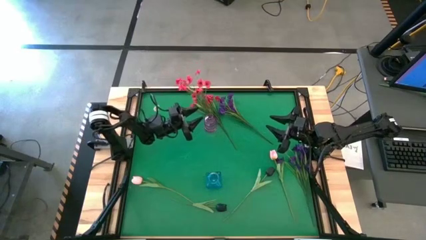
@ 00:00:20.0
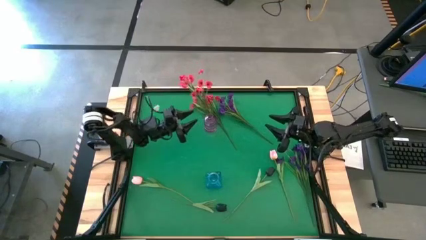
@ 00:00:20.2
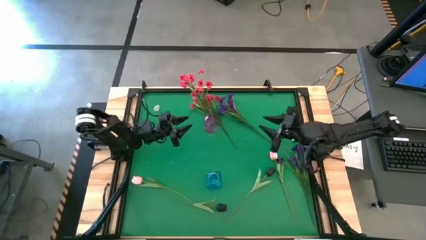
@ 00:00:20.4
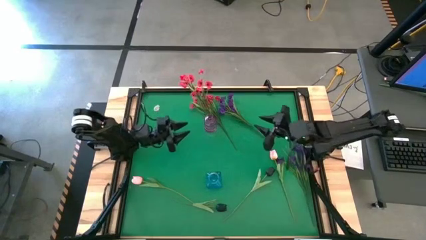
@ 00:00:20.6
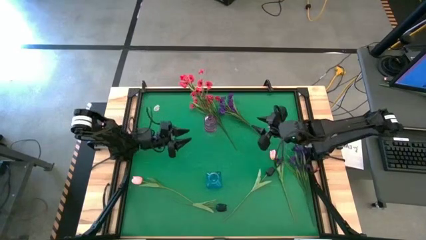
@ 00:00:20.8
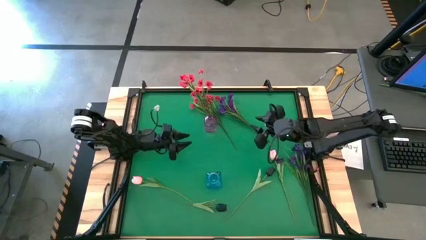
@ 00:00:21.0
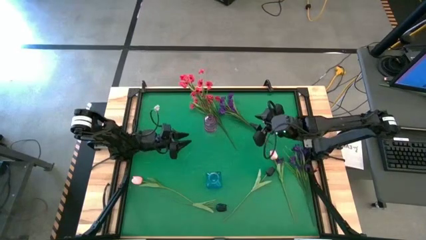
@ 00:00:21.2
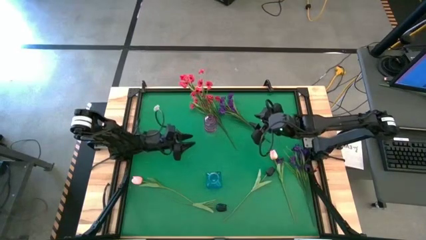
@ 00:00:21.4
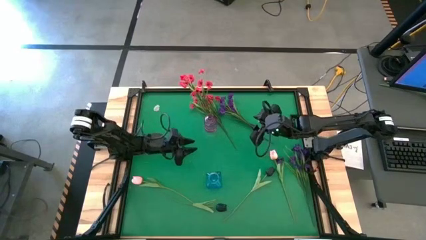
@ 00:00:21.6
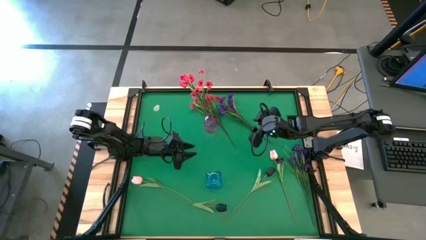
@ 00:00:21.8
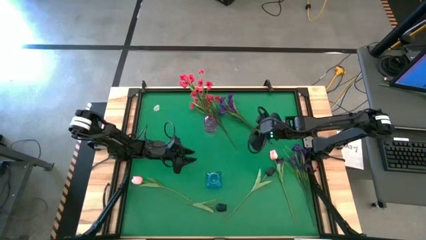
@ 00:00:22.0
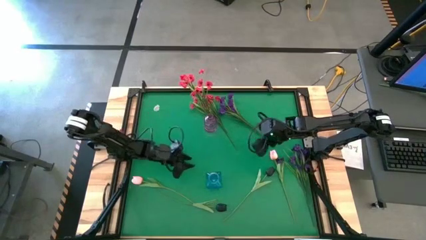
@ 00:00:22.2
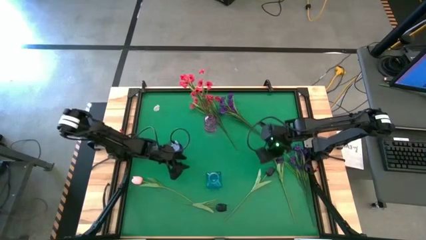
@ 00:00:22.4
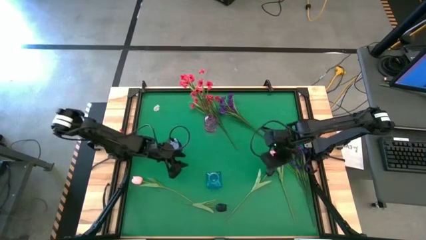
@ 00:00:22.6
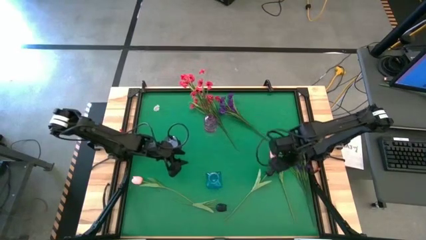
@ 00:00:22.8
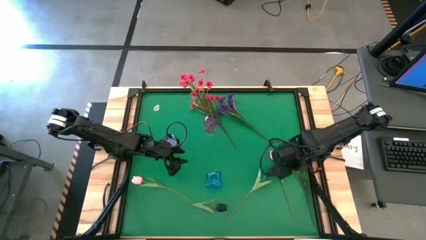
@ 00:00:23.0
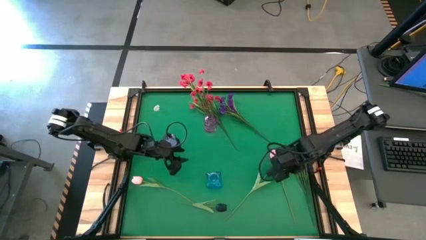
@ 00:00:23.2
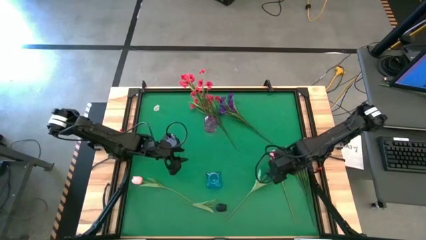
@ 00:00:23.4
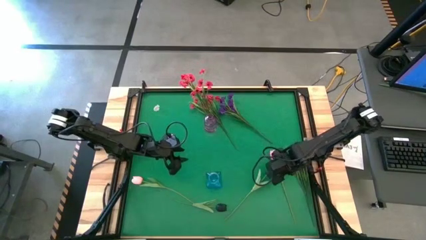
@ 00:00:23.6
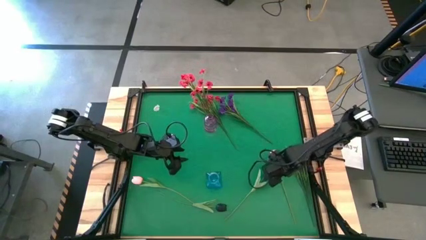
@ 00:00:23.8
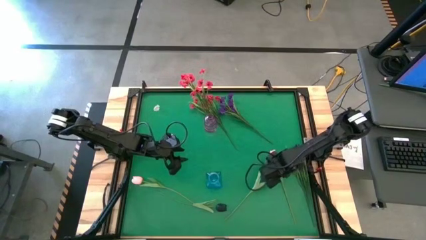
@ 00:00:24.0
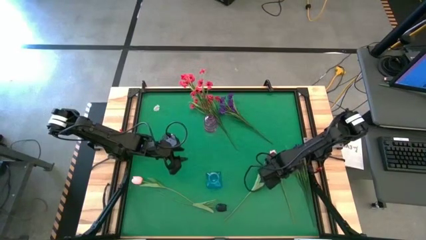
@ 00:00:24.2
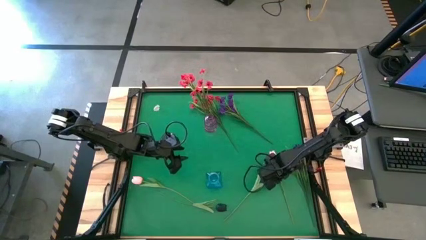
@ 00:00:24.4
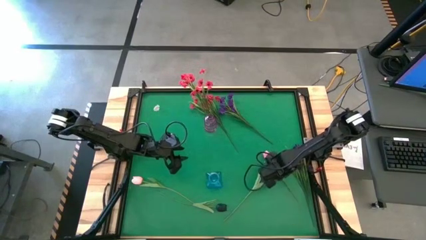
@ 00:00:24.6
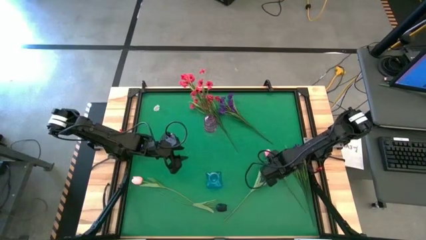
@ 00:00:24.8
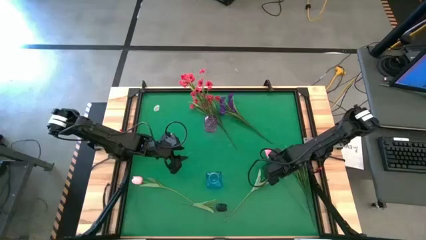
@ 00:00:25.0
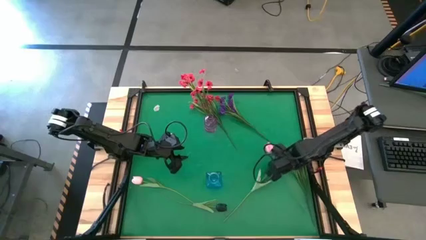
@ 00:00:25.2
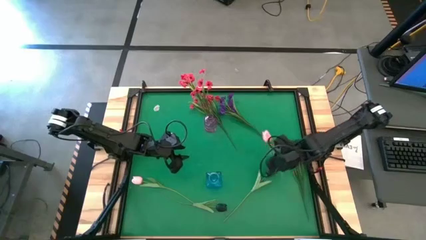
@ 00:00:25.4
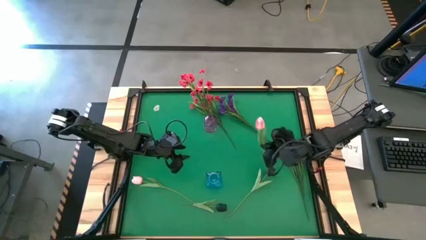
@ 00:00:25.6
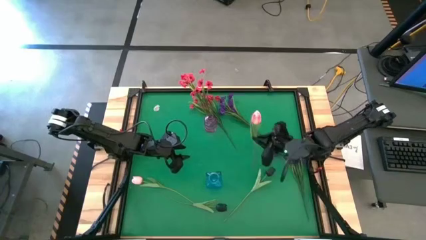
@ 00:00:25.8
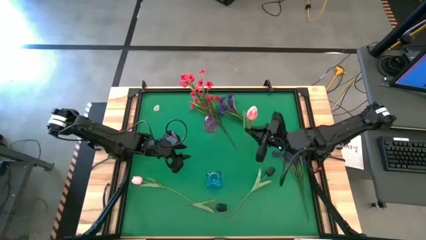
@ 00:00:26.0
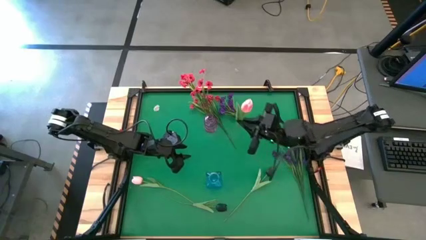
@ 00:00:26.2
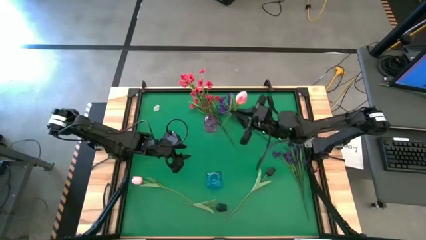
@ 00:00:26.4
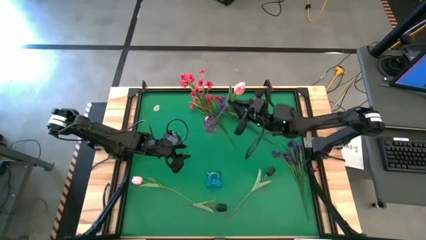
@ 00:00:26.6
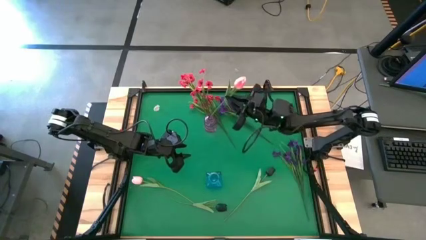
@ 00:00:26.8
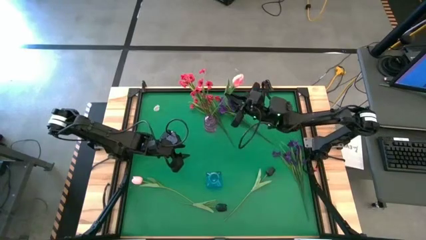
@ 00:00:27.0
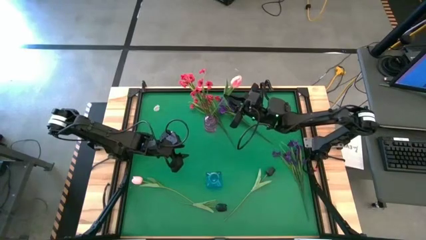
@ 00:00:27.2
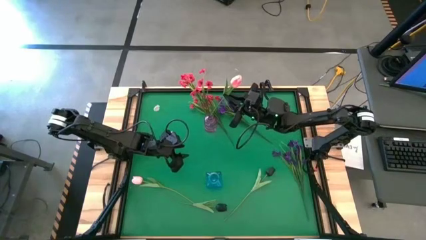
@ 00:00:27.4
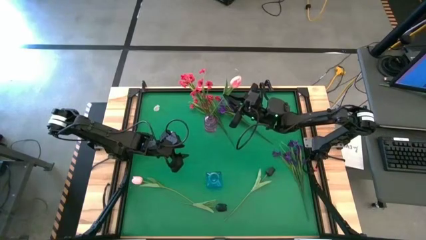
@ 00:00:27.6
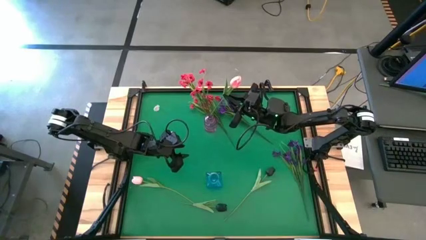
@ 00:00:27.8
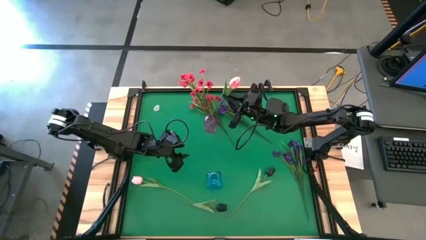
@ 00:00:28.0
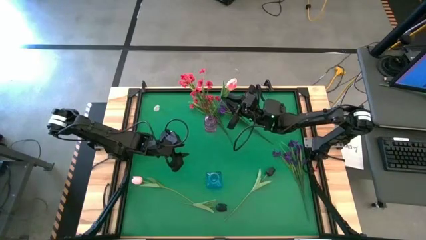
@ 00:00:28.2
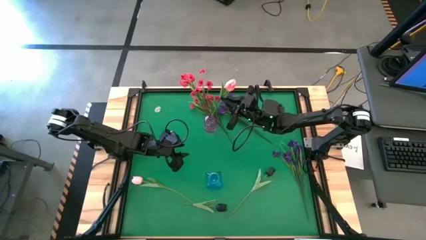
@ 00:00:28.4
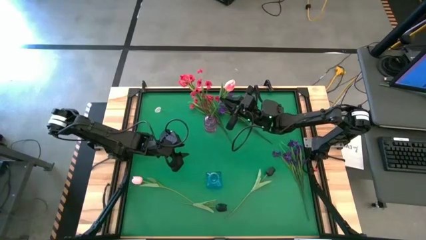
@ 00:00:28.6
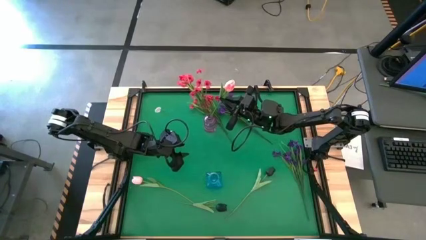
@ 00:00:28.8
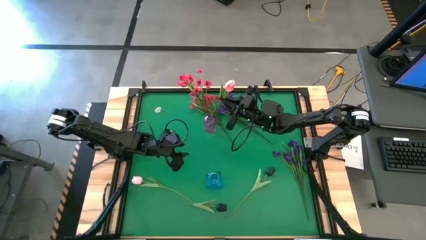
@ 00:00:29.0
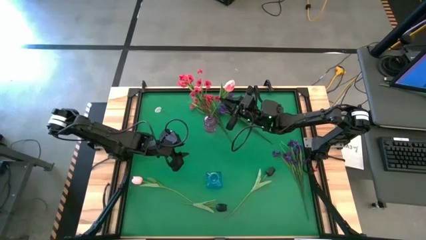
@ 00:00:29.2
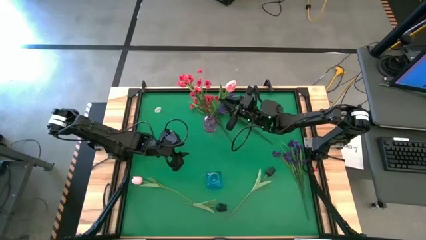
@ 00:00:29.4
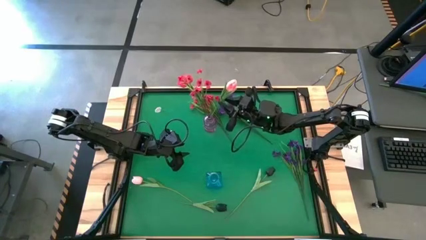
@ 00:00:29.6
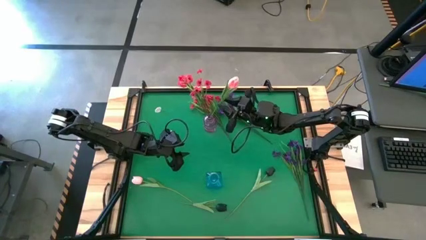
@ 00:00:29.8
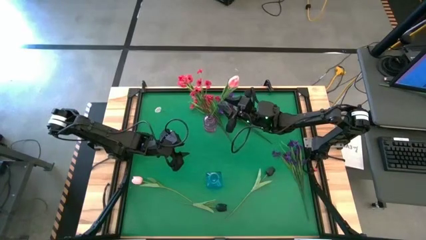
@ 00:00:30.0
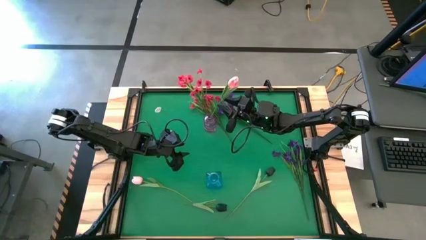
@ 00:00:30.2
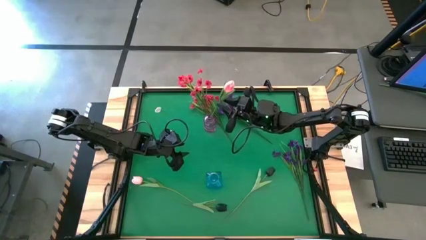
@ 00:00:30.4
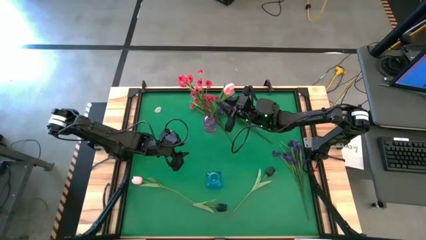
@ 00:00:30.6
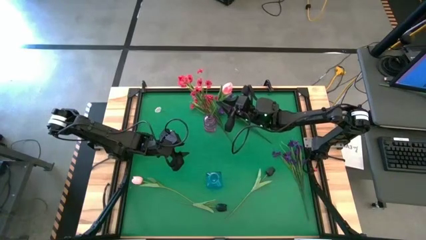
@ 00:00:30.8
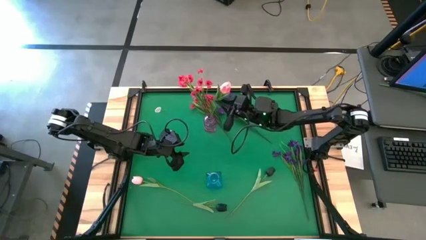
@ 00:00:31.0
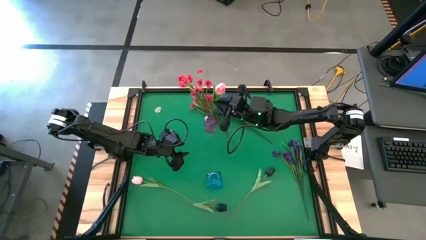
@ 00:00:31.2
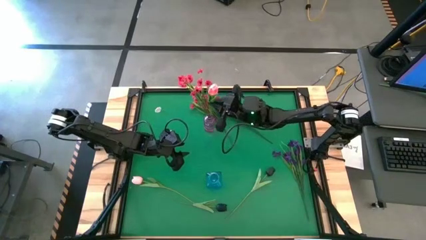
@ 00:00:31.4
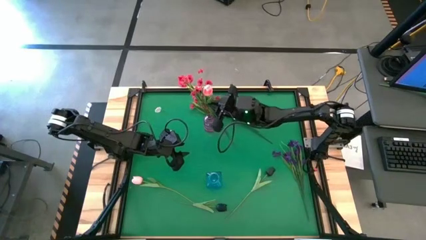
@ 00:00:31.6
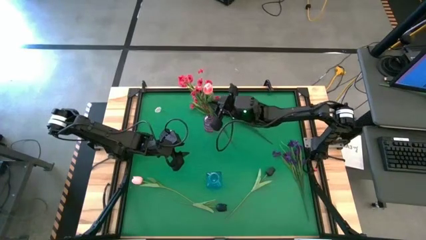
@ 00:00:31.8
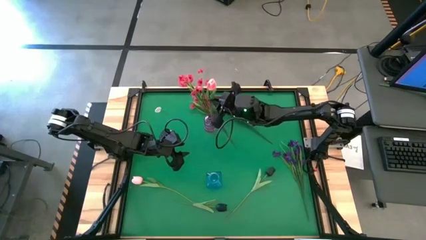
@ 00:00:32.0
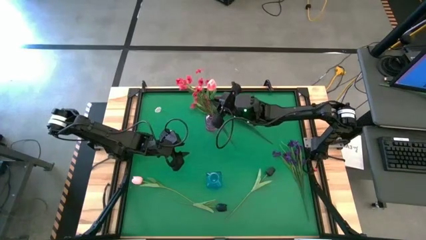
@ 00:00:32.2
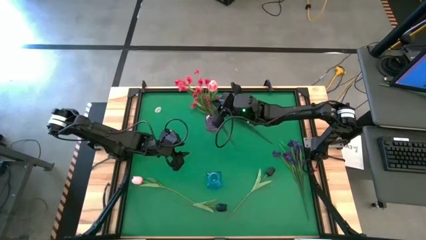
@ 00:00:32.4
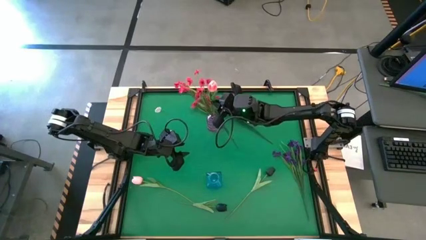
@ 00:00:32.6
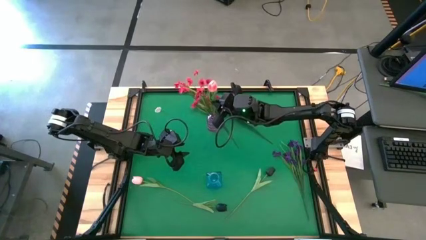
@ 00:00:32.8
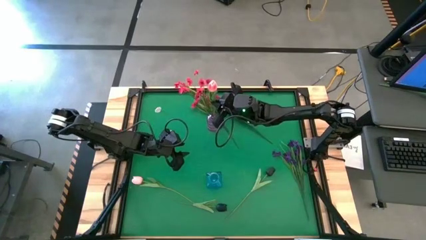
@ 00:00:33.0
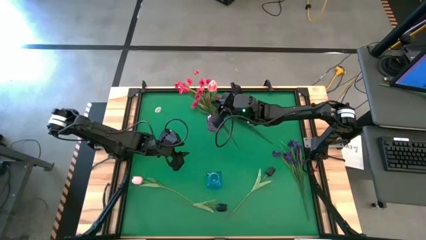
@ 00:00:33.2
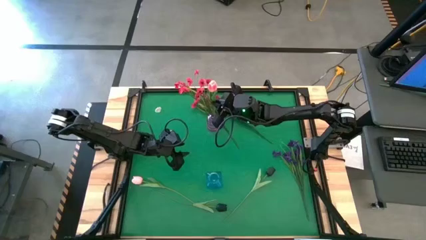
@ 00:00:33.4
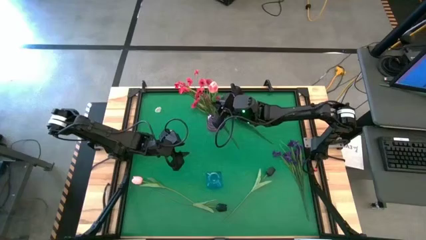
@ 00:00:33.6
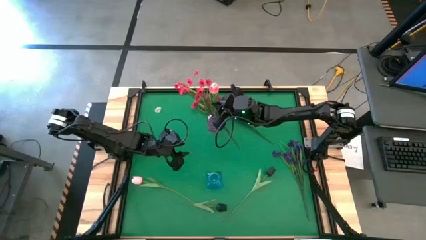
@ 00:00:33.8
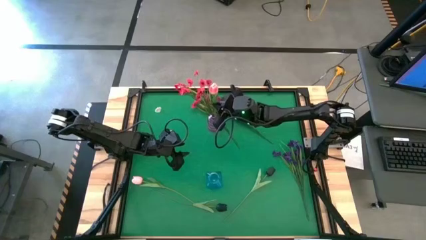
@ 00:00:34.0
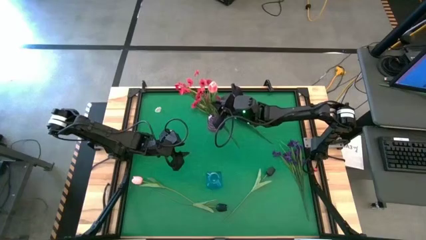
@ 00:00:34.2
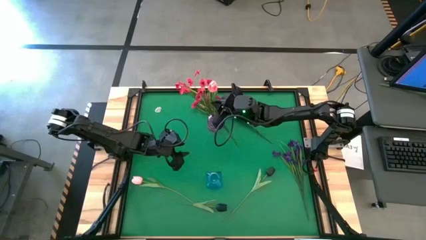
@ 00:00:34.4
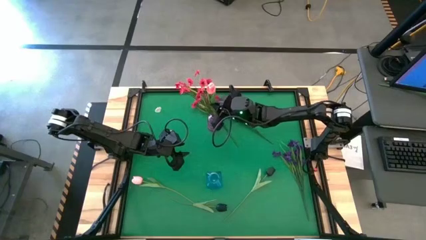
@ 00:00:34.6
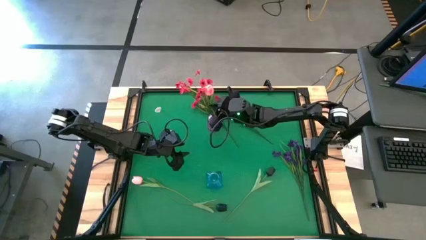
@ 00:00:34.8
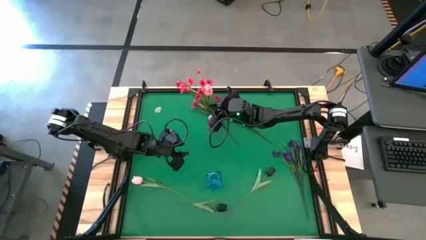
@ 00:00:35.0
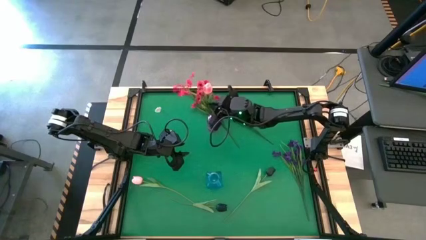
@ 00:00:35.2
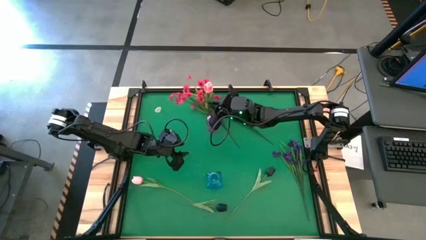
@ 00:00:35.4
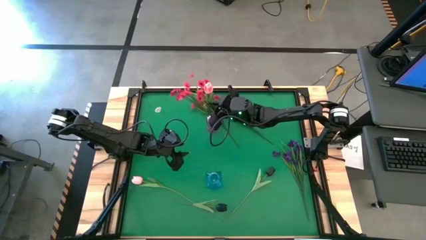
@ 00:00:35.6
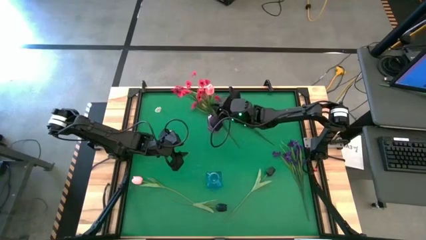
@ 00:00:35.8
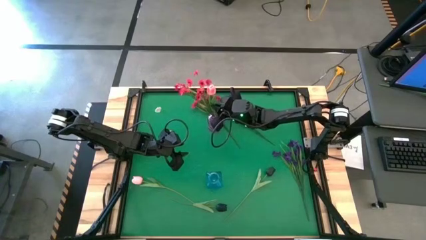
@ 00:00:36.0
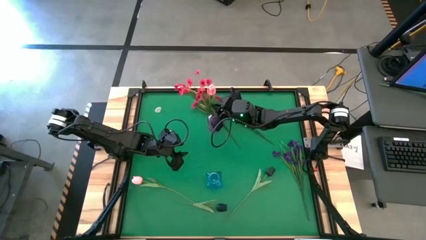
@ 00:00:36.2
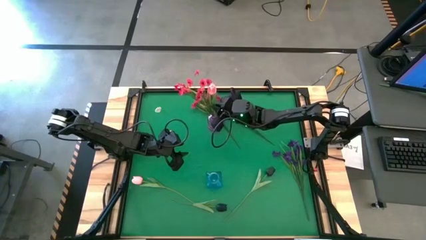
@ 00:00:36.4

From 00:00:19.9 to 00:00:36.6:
Task: Sort flowers into vase by color
Put the right pink tulip into the purple vase
